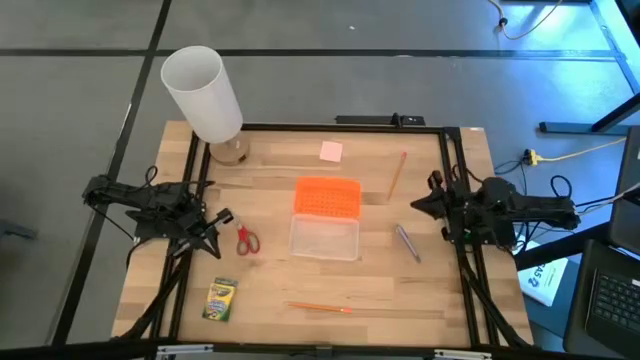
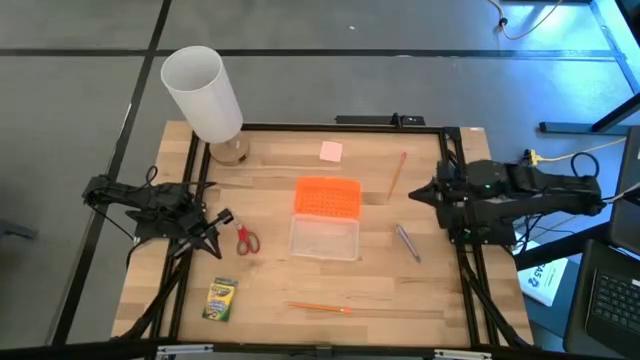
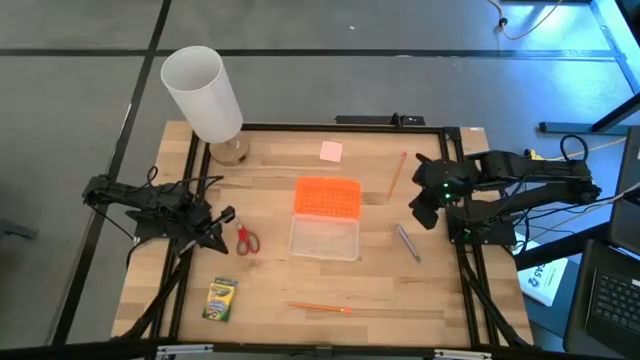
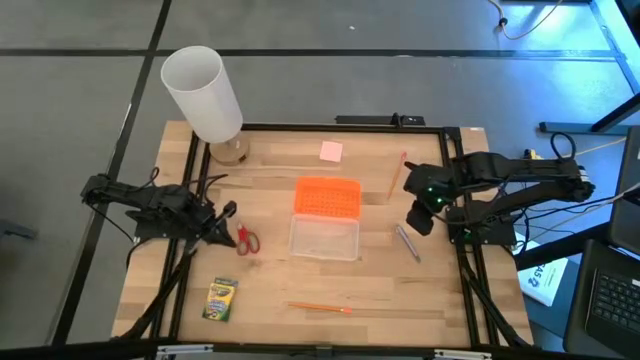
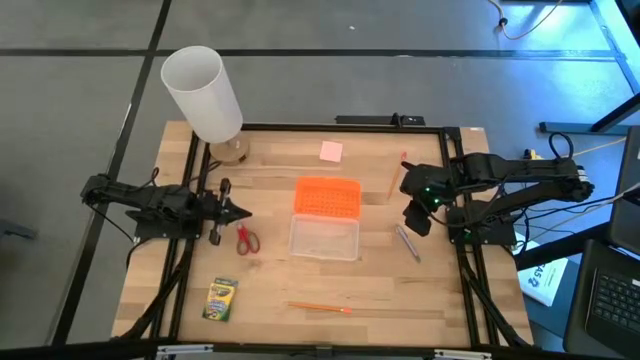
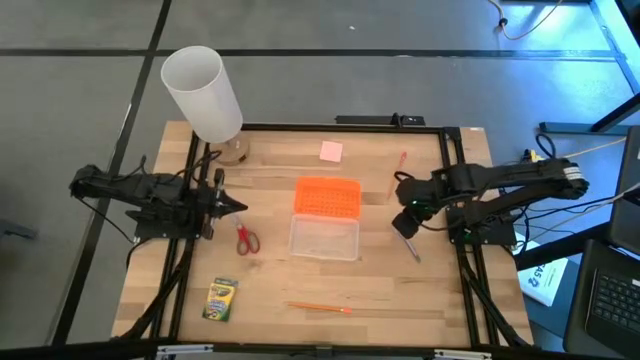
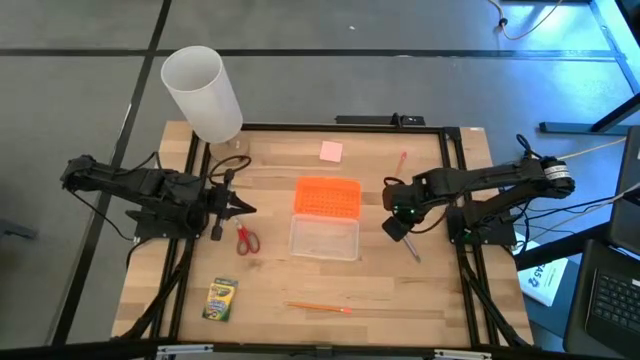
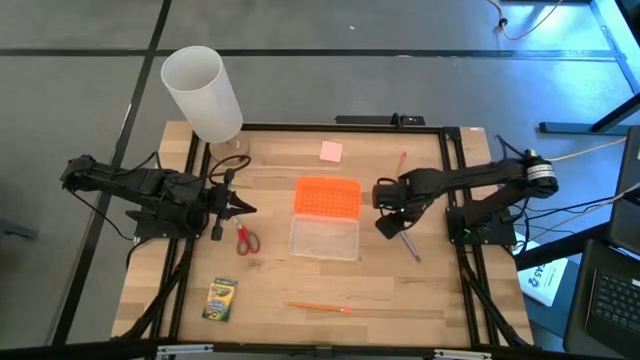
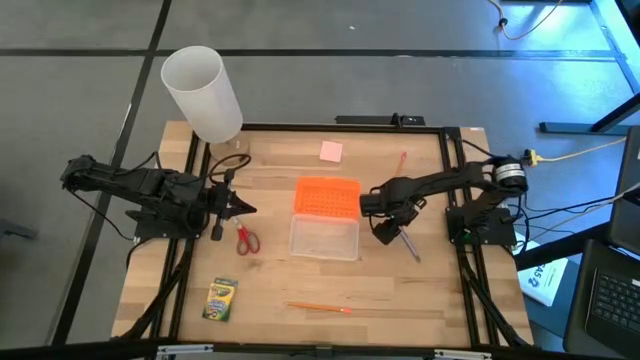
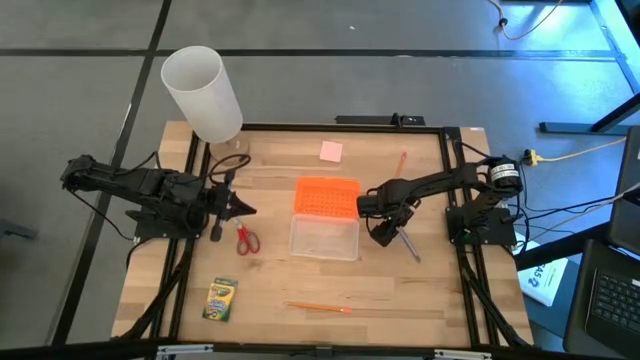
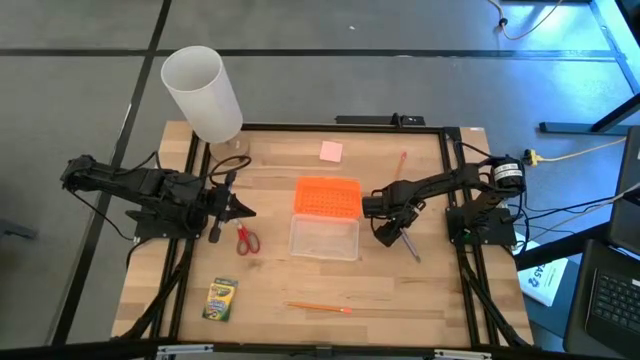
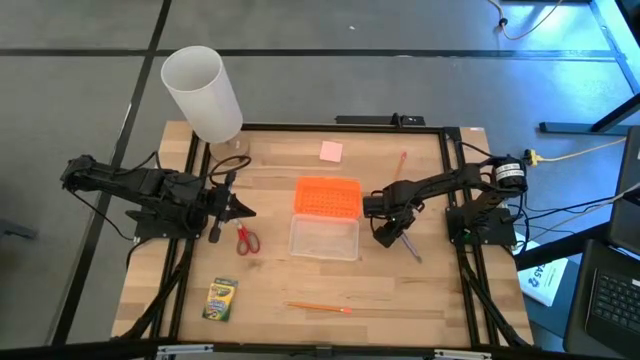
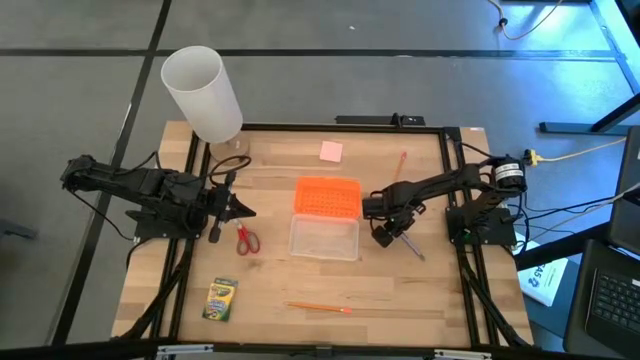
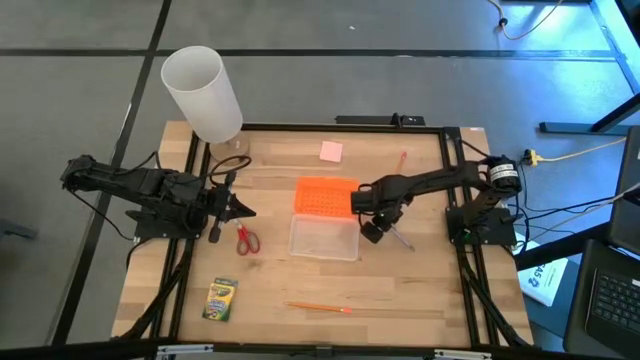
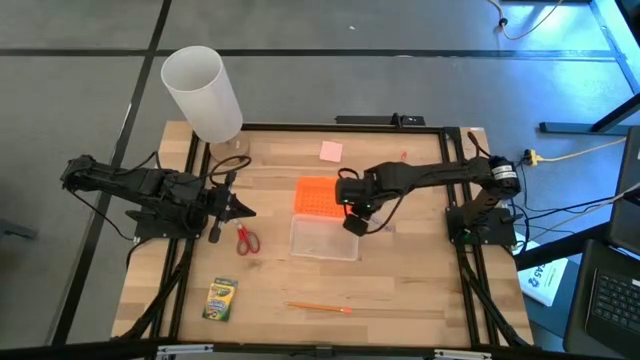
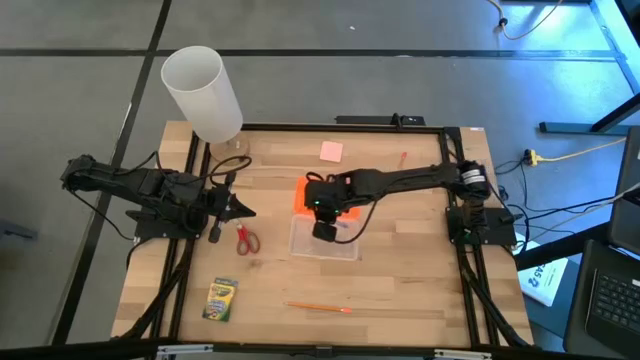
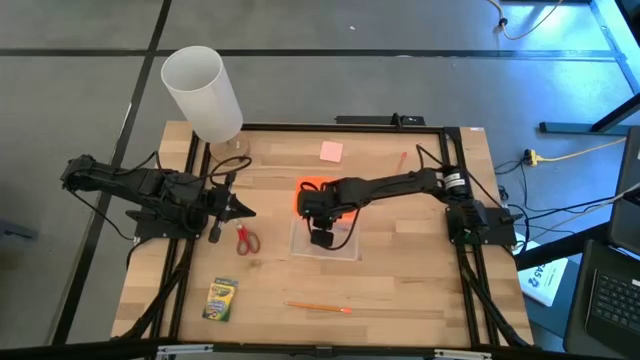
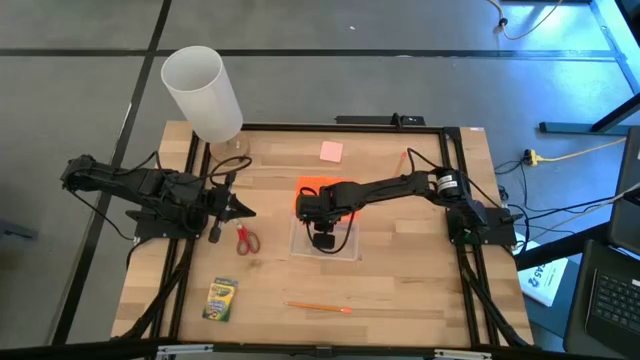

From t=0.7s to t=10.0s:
Task: Pack school essentials
Put the purple pen into the orange supply box

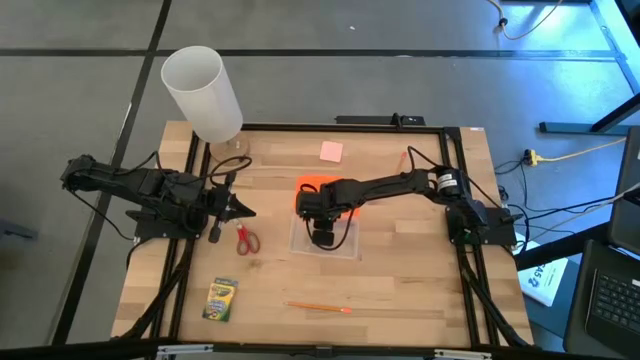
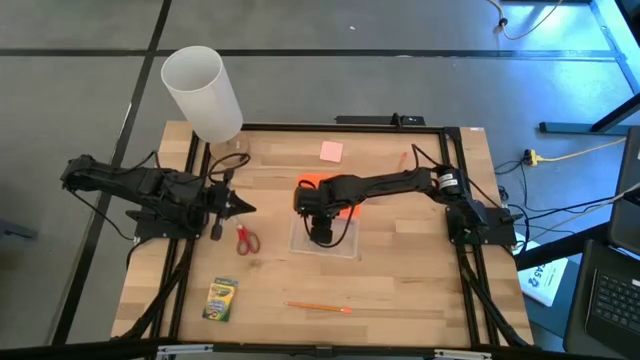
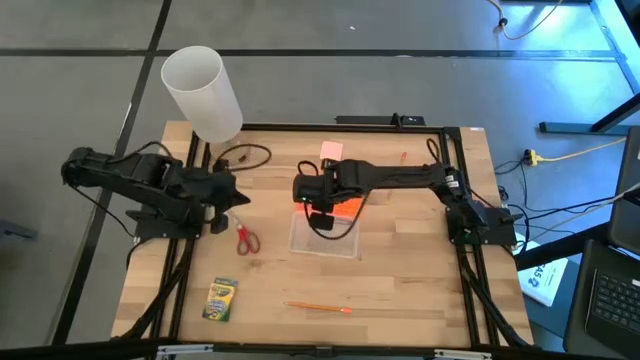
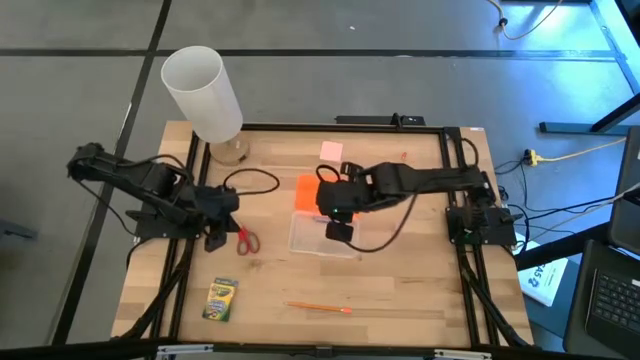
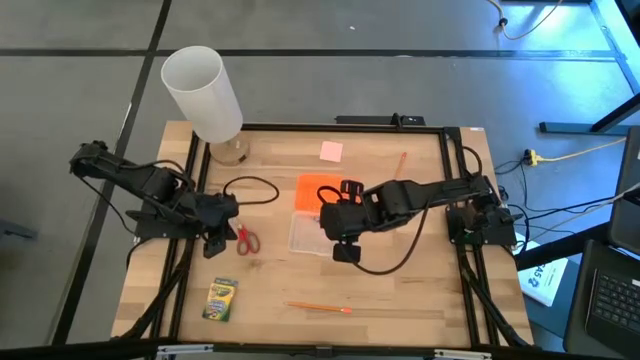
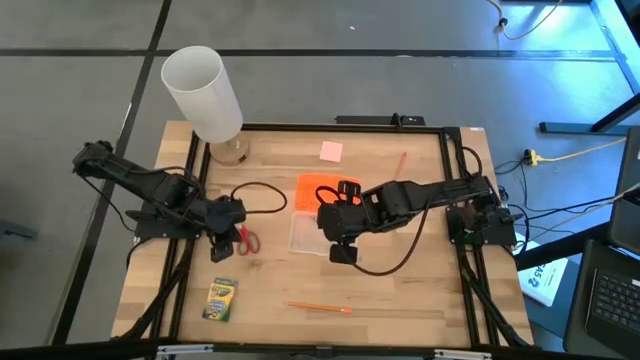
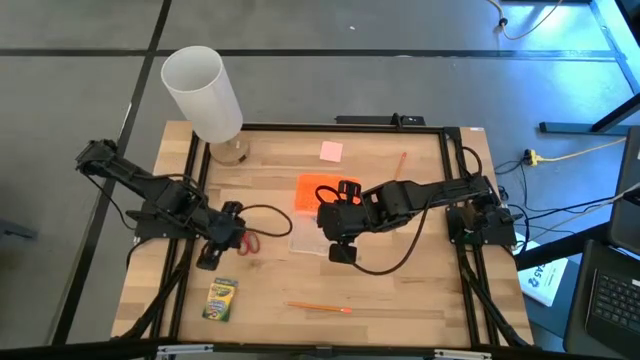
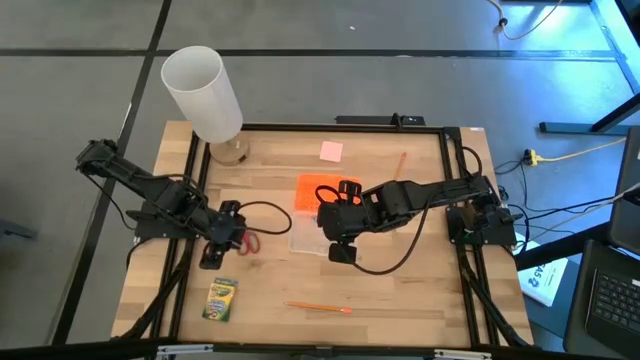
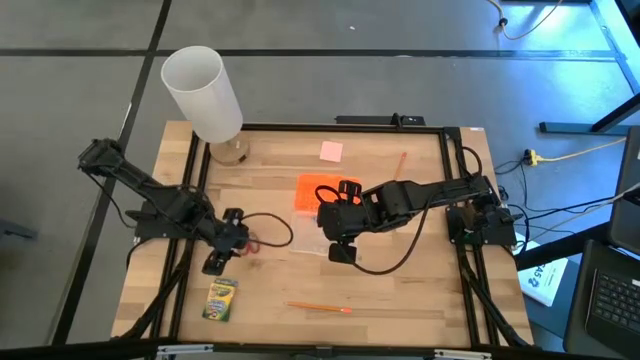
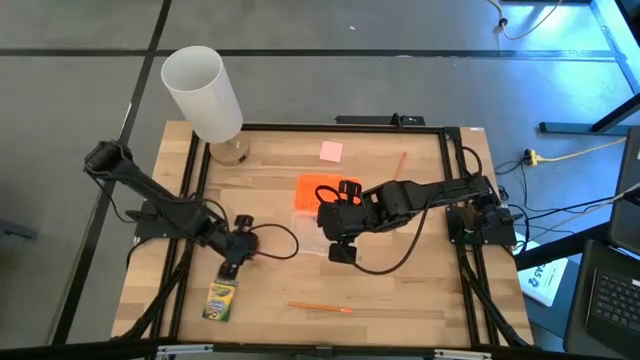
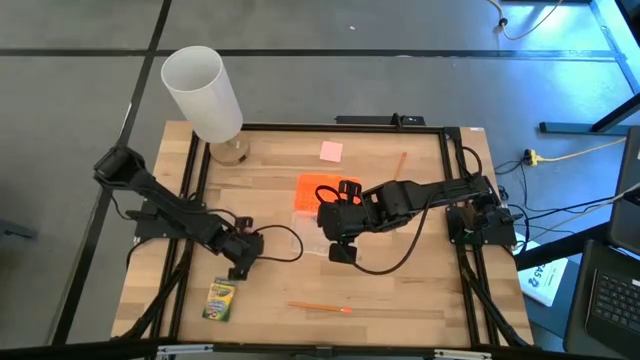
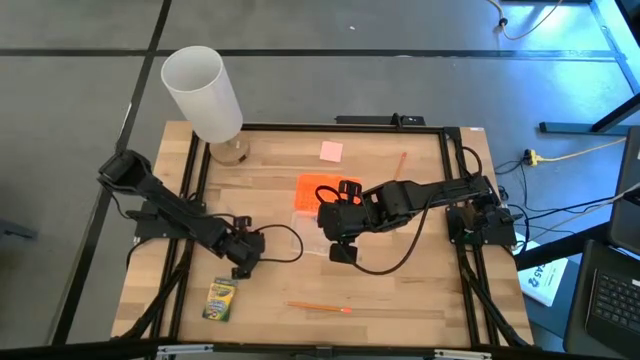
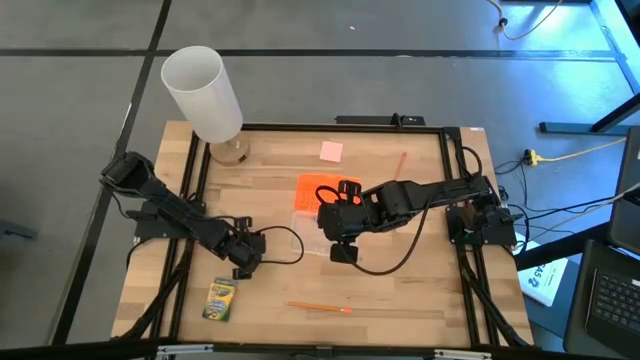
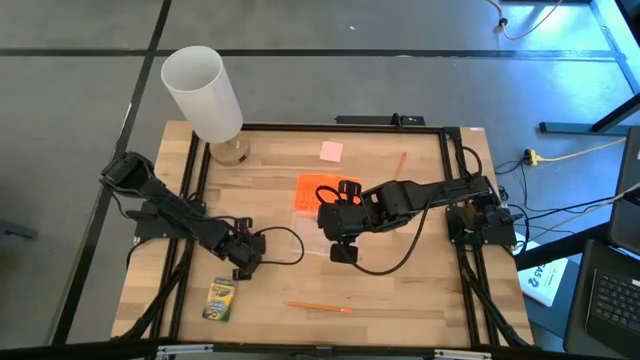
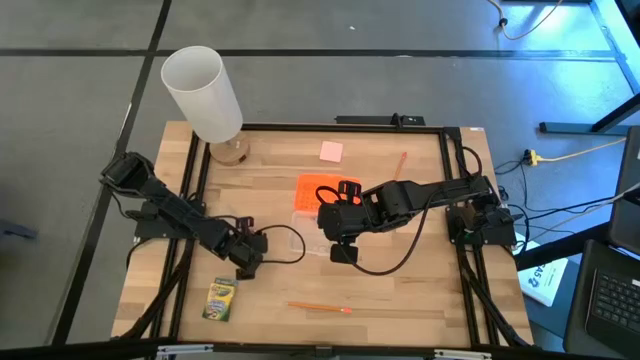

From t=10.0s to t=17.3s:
Put the scissors into the orange supply box

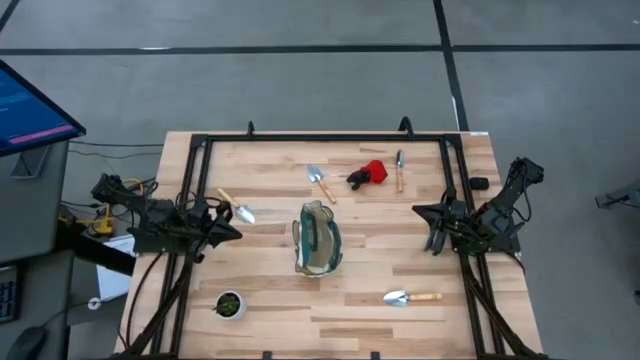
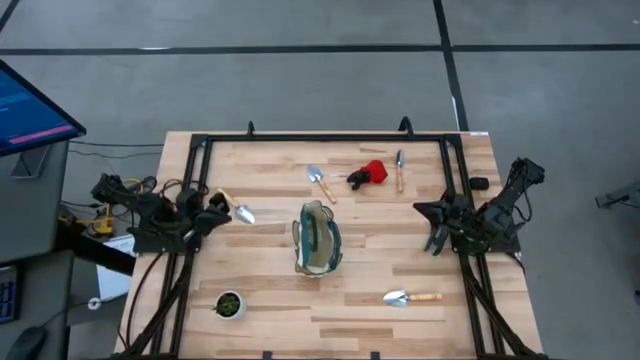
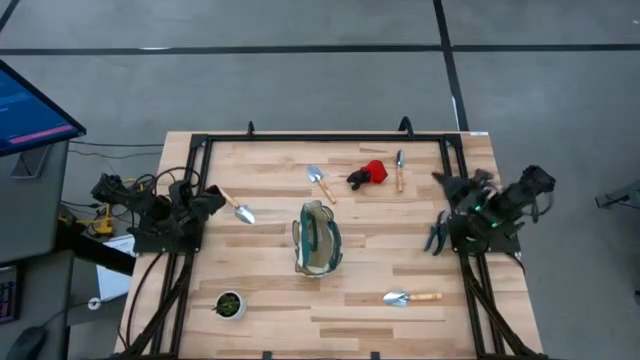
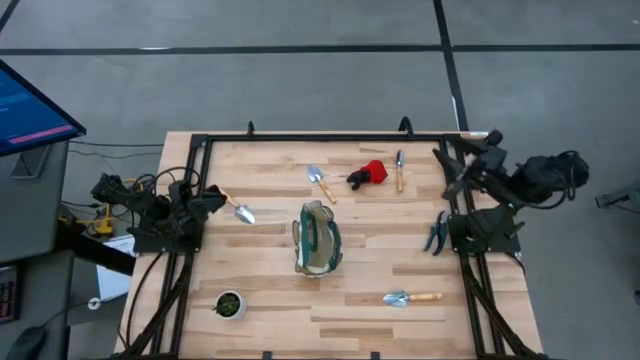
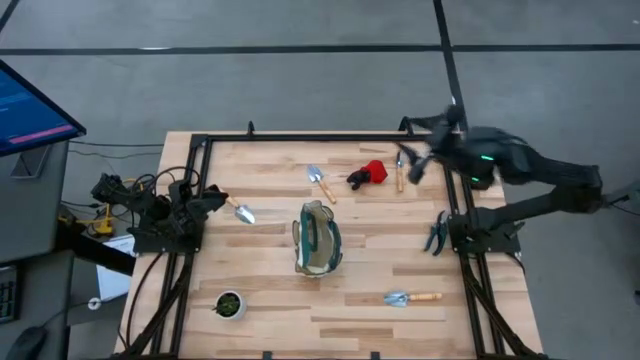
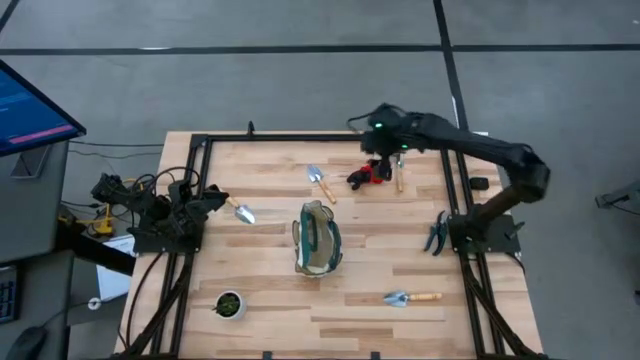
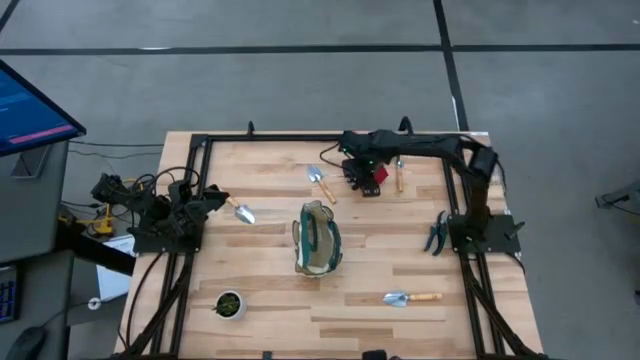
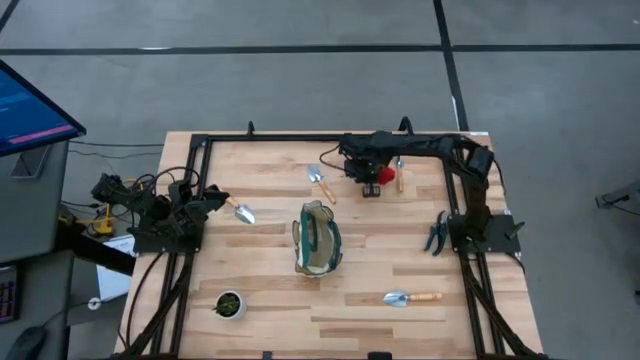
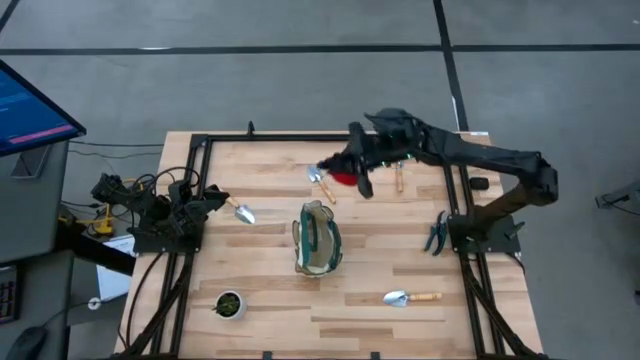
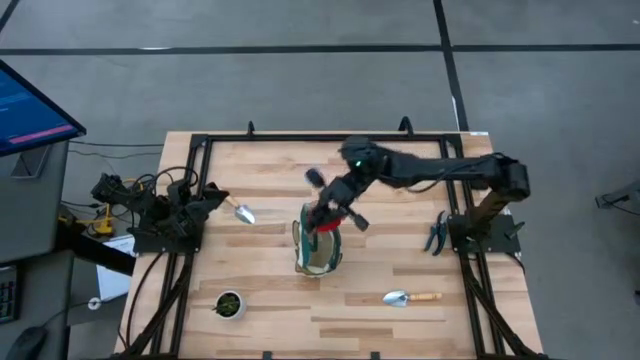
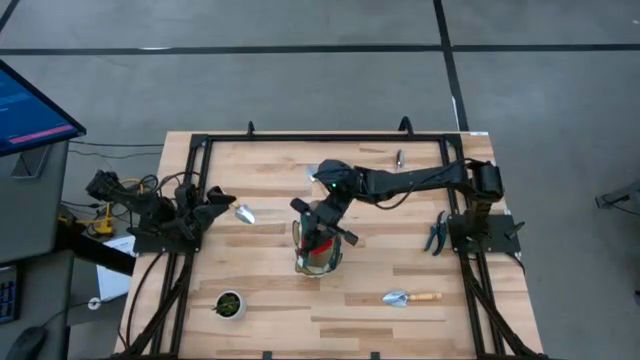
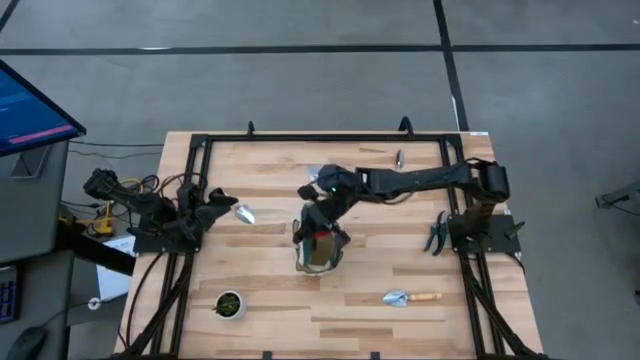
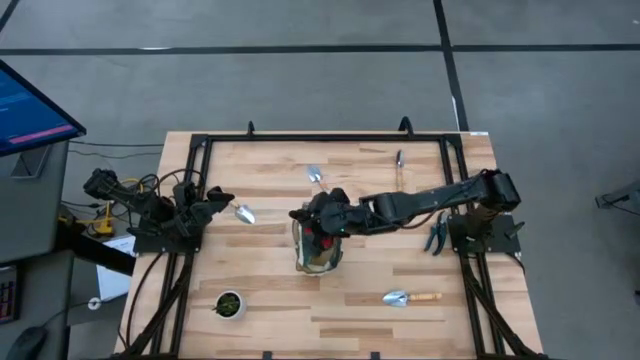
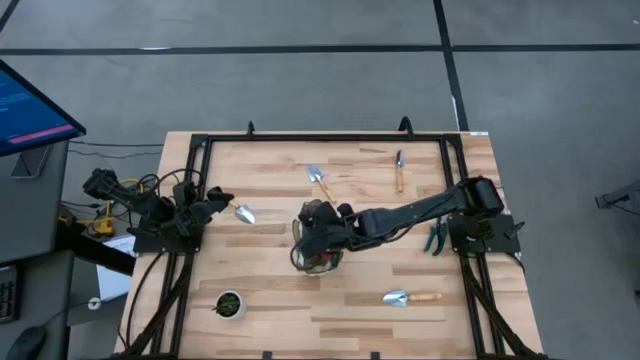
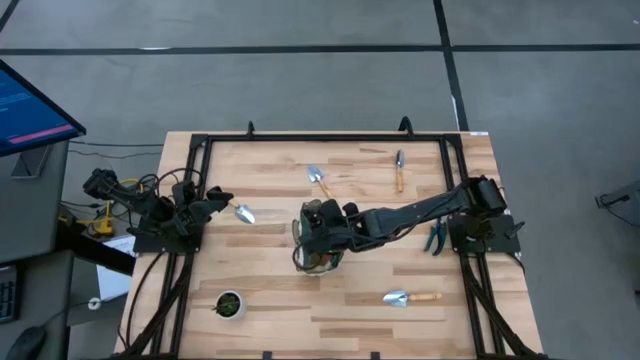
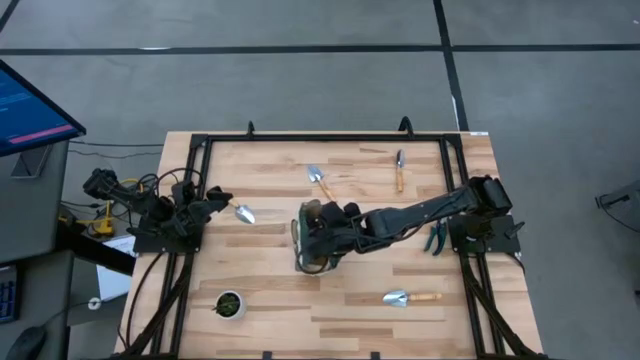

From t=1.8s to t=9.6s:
Task: Pick & Place Garden tools in Gardening bag
Put the red gloves into the green bag
